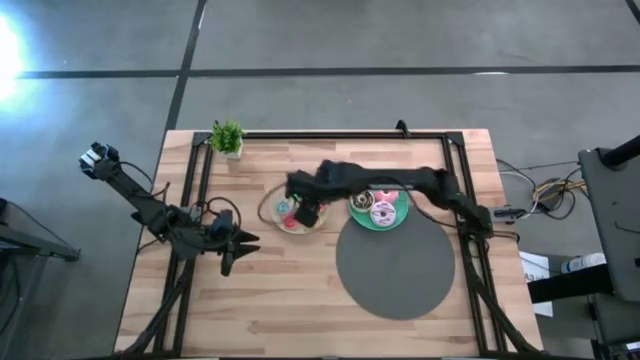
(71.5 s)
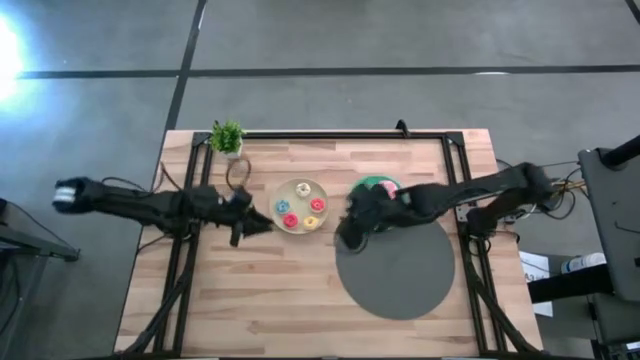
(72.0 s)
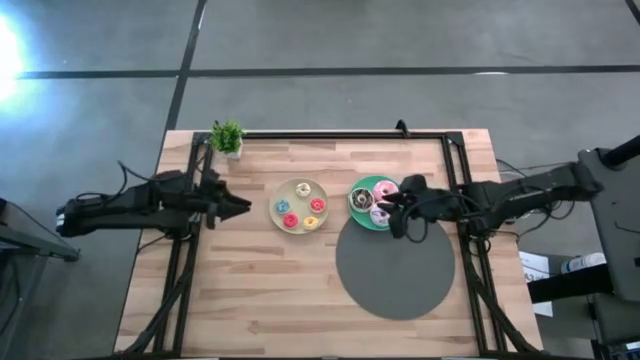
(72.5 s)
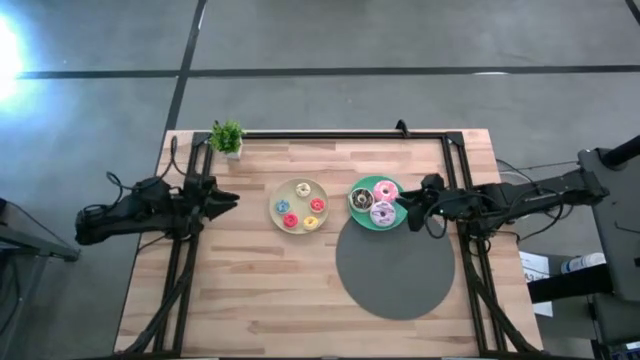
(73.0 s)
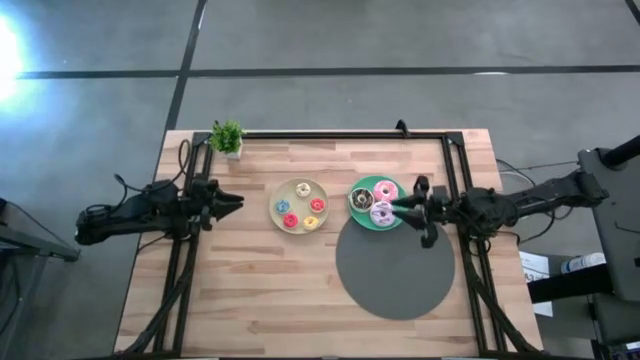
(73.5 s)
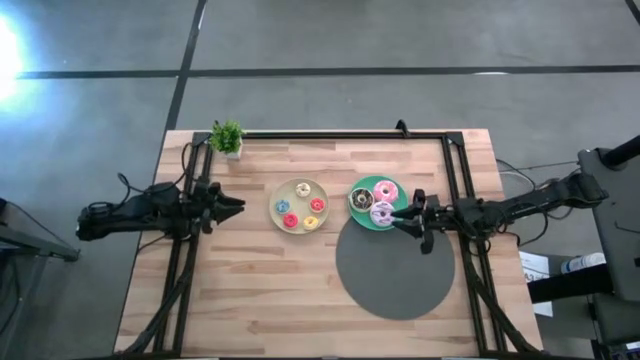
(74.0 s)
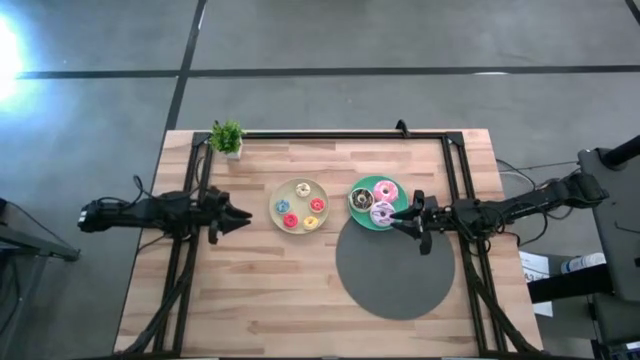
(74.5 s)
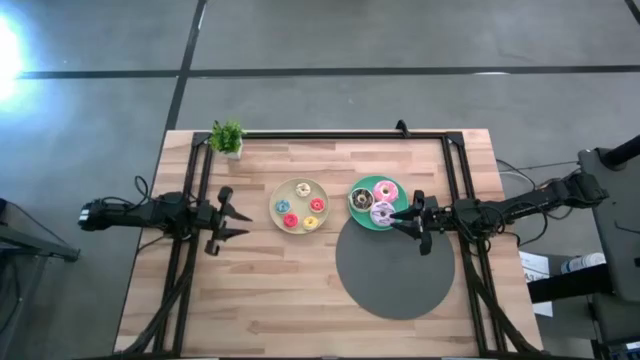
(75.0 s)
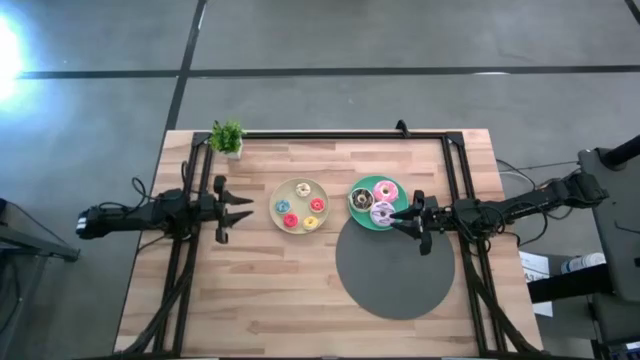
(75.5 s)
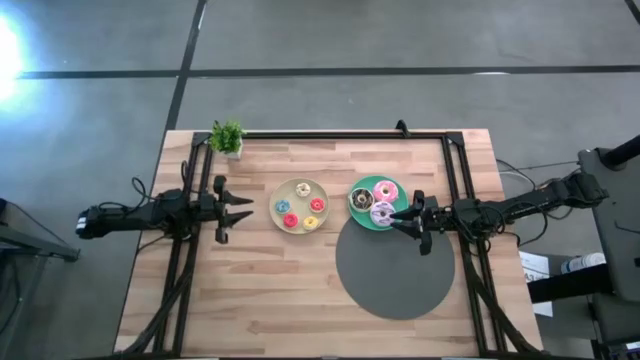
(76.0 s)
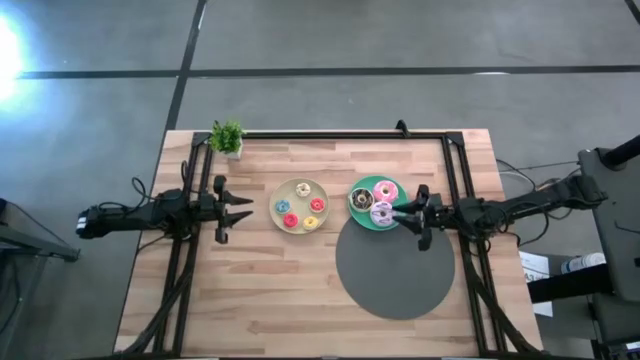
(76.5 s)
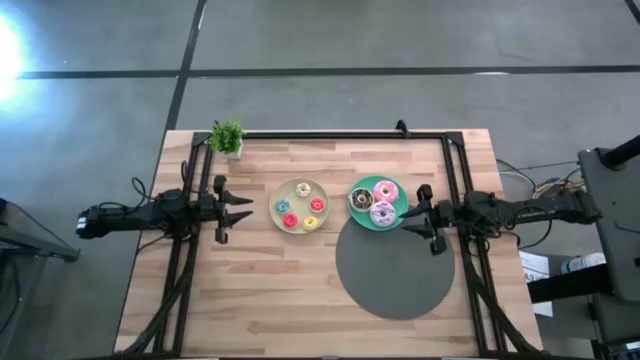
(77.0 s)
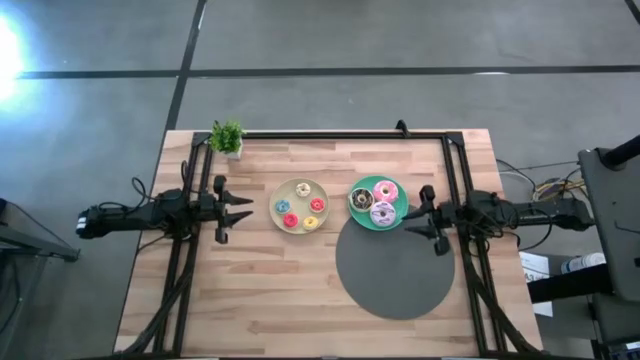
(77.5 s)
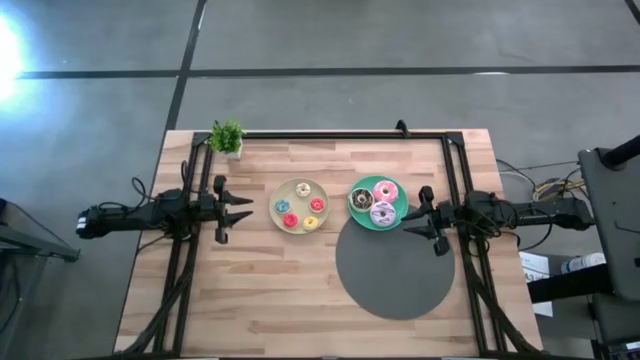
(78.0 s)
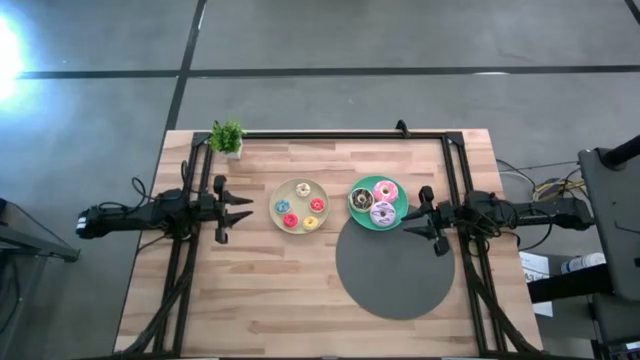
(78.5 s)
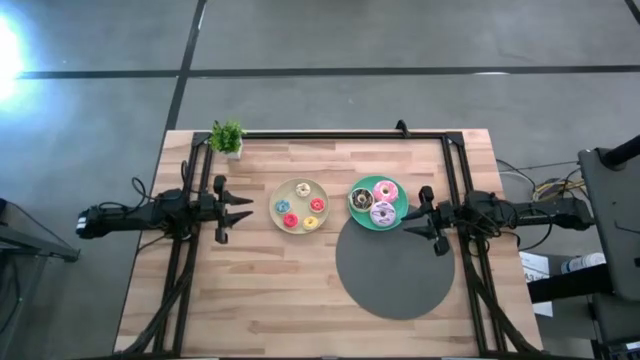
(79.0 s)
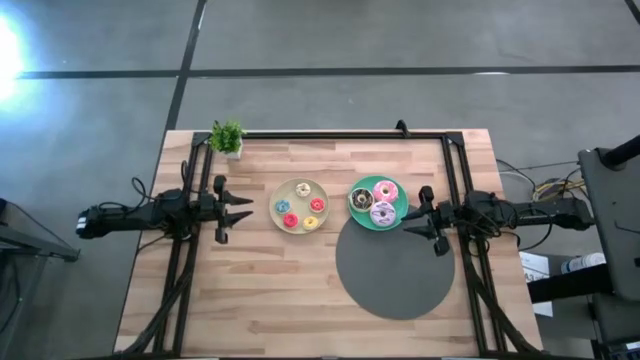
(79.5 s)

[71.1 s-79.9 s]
Task: Pick & Place donuts
Return to Home Position

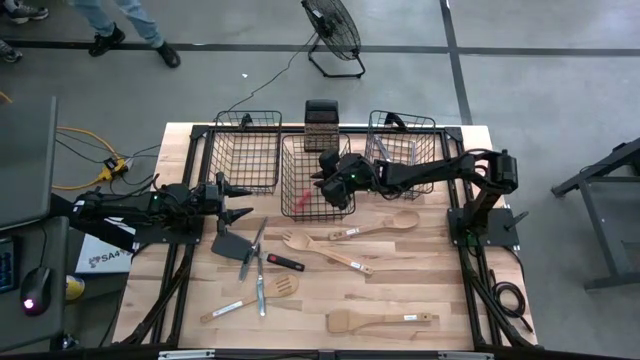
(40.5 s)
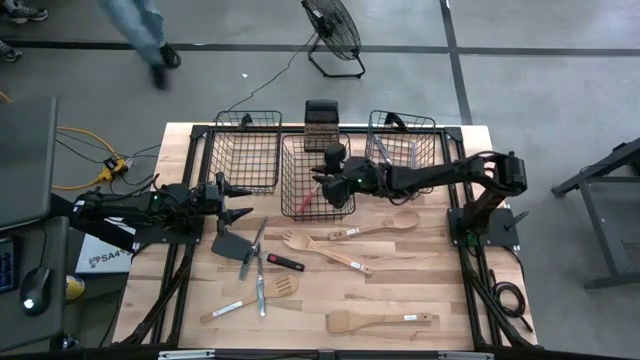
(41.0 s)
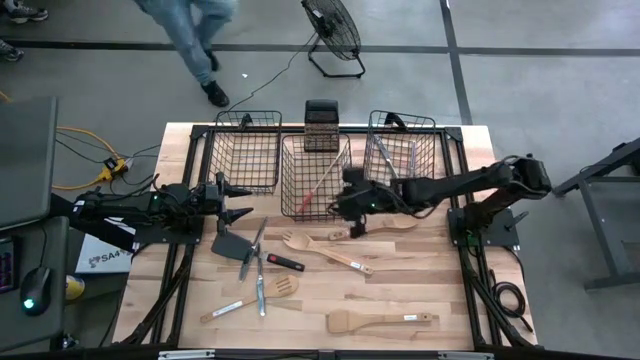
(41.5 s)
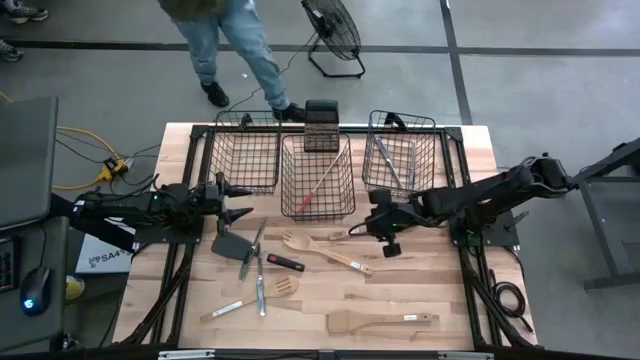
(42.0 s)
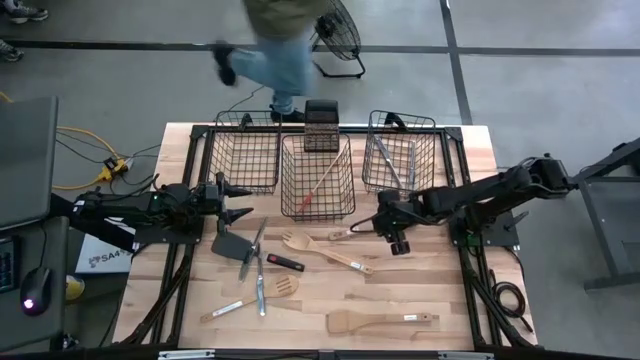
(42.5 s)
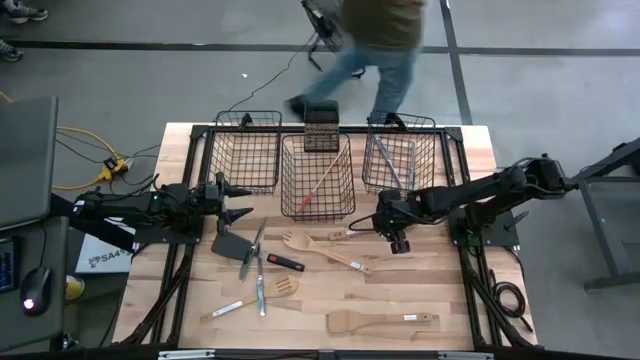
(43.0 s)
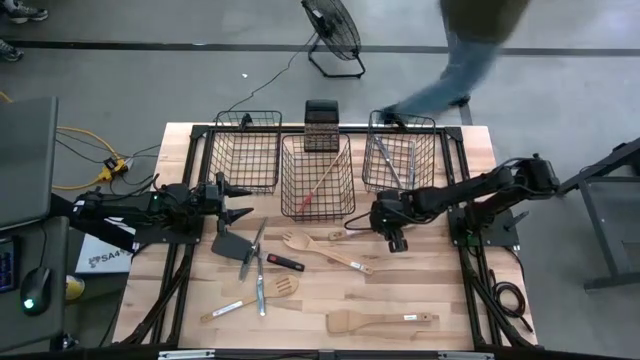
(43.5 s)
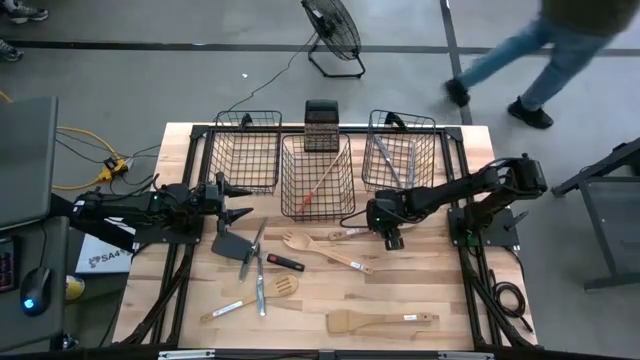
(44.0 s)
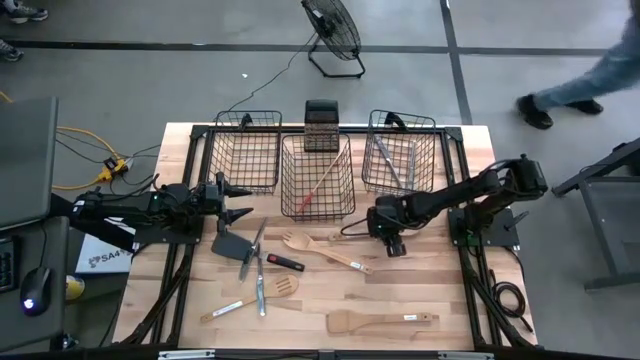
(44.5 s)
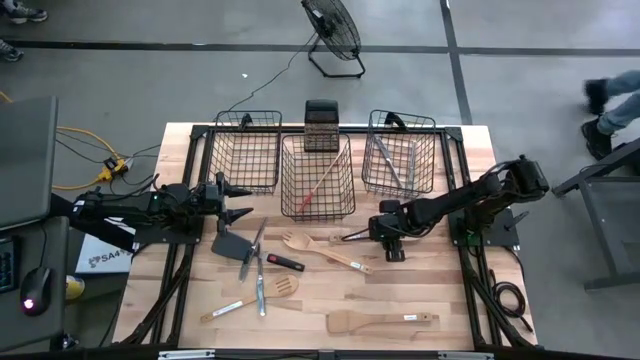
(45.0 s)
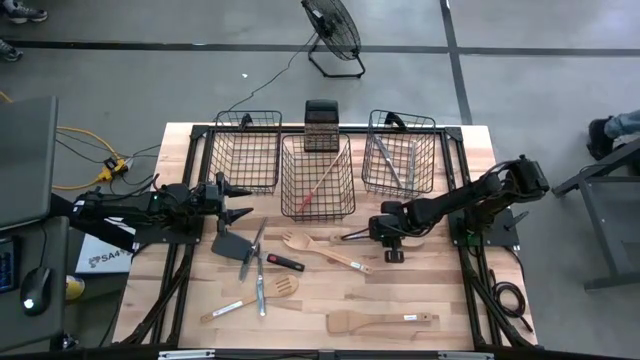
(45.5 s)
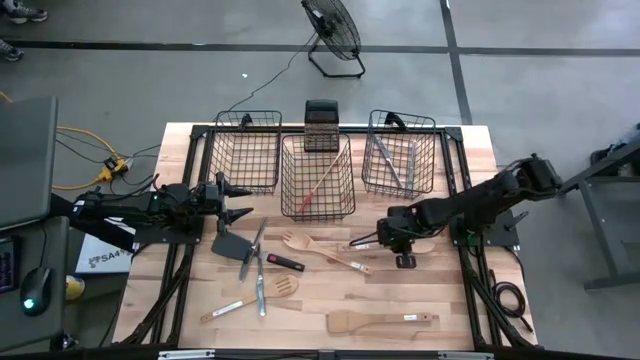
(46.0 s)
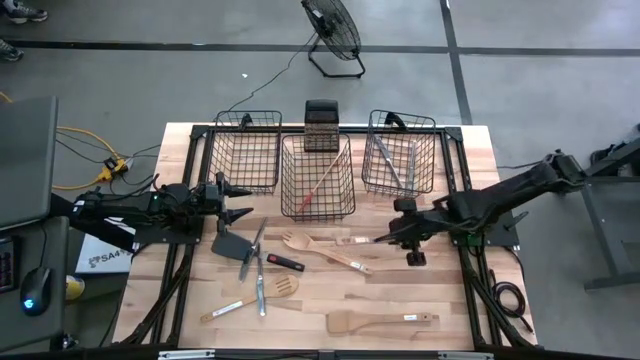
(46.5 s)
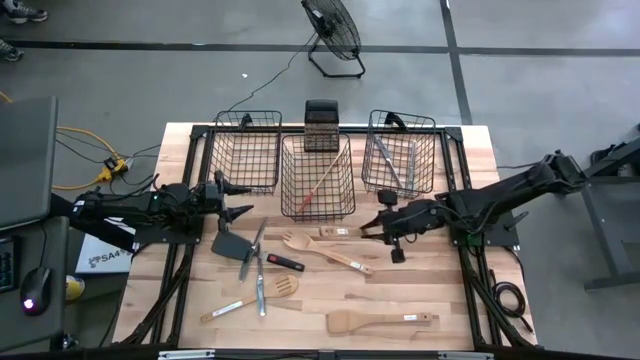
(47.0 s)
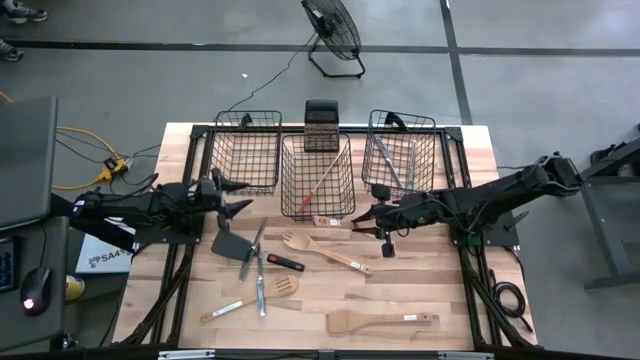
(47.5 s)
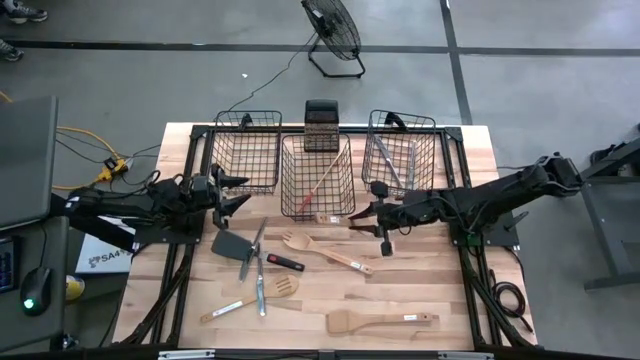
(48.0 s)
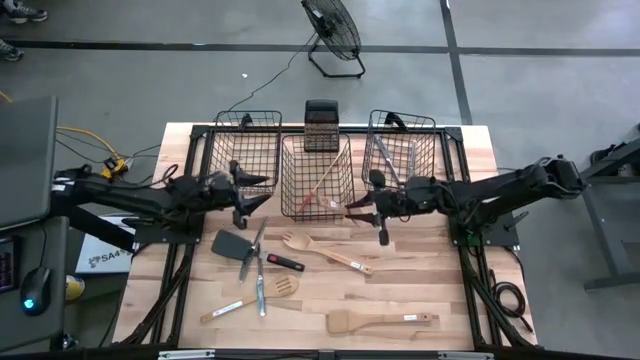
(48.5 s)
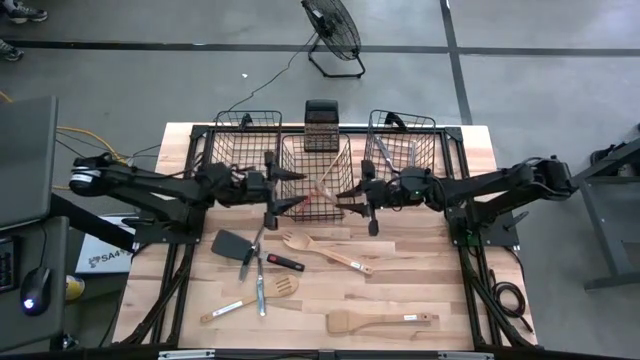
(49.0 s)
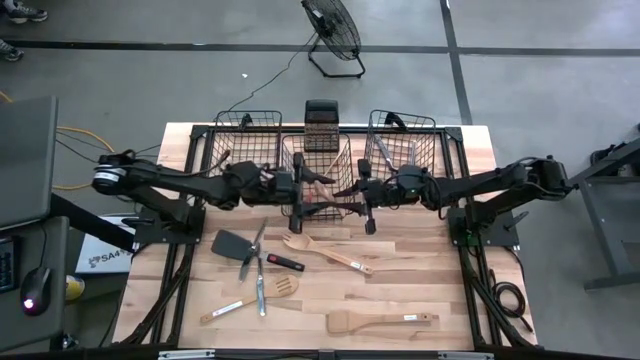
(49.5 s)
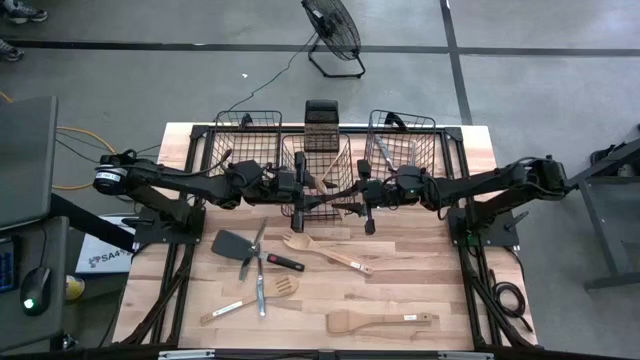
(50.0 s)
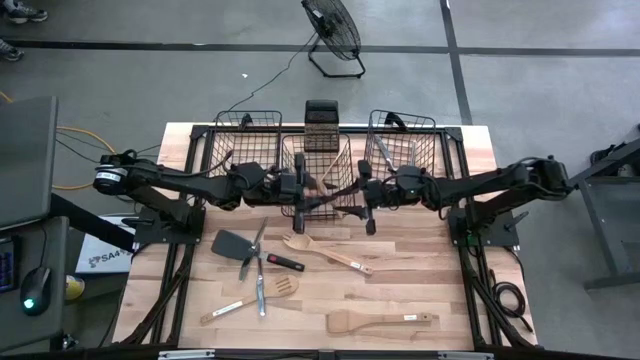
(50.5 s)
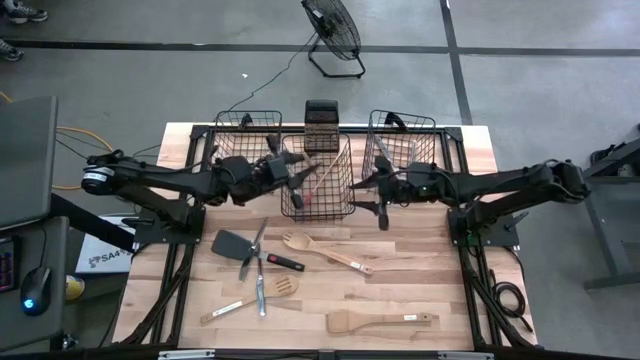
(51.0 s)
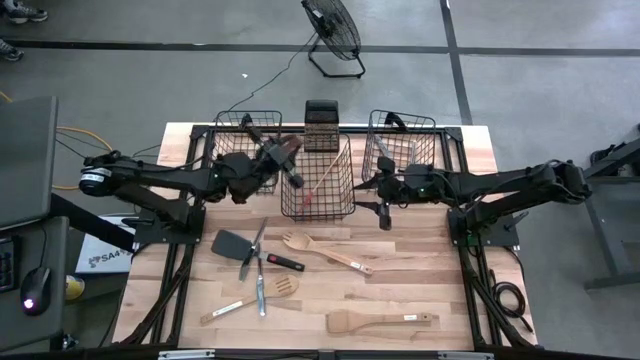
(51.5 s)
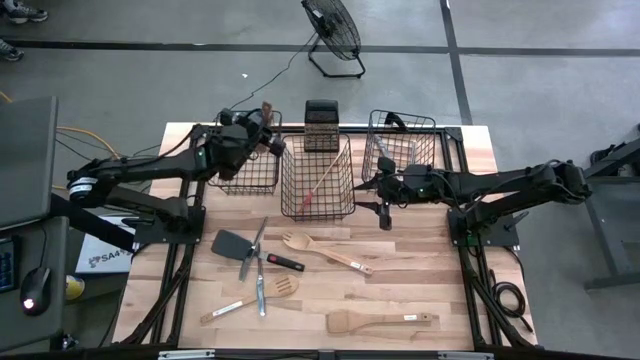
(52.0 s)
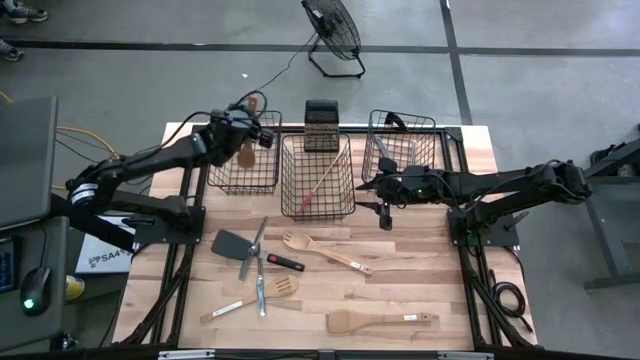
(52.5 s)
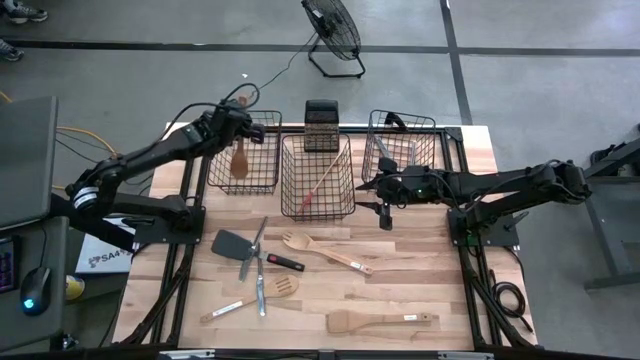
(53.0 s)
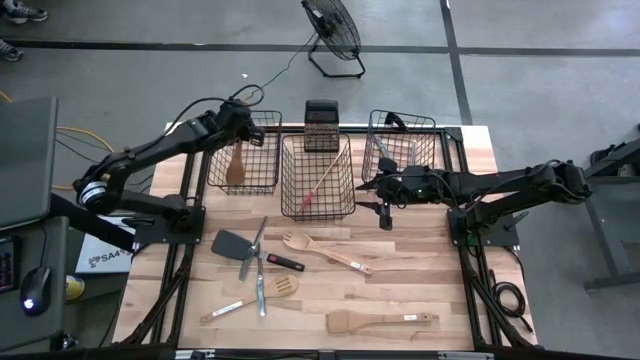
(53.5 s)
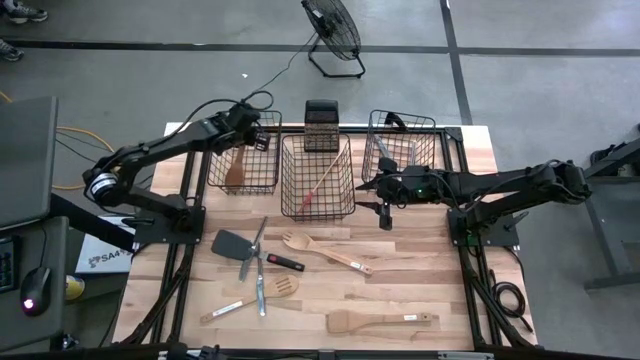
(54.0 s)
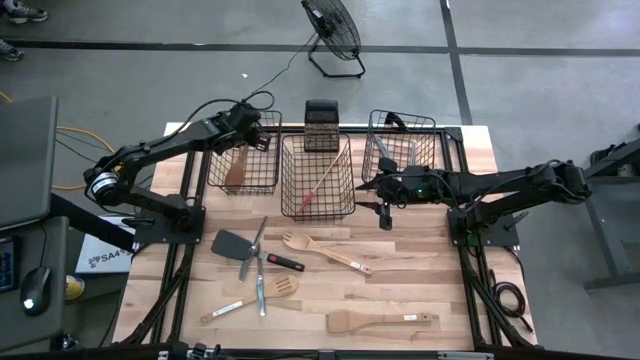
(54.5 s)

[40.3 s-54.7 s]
Task: Pick & Place Kitchen Items
Put the light brown wooden serving spoon into the left wire basket
